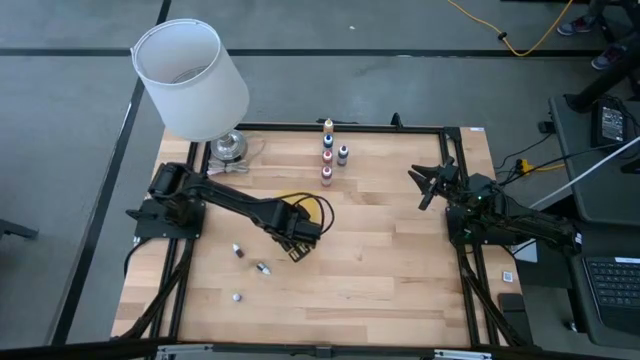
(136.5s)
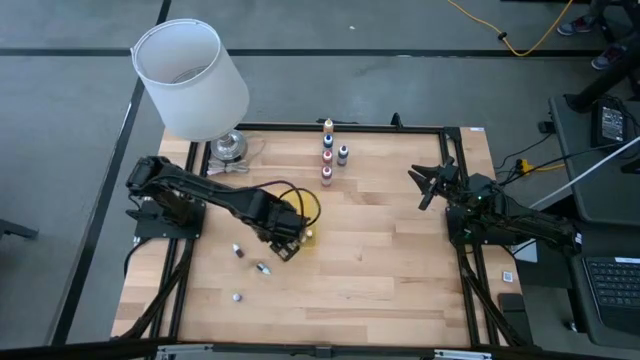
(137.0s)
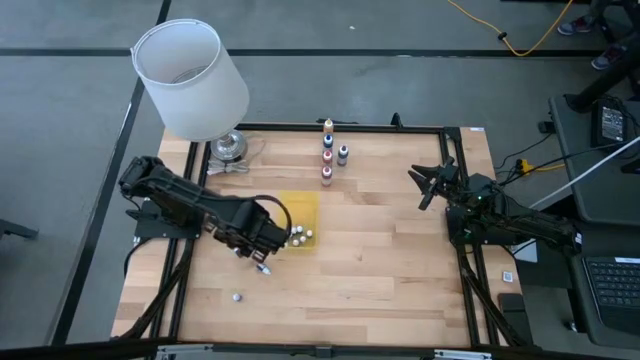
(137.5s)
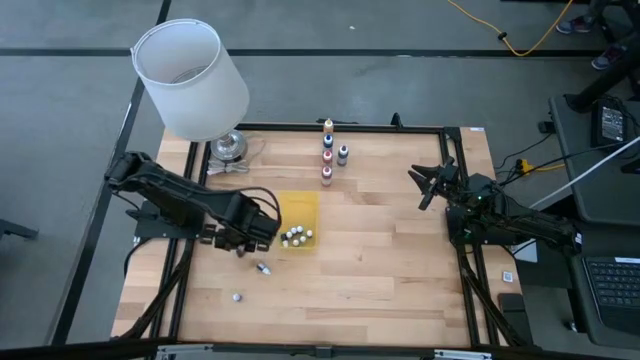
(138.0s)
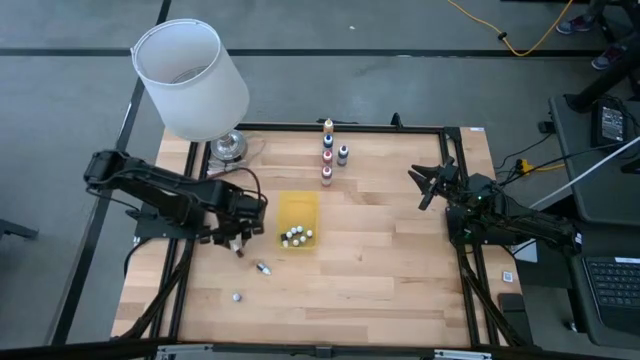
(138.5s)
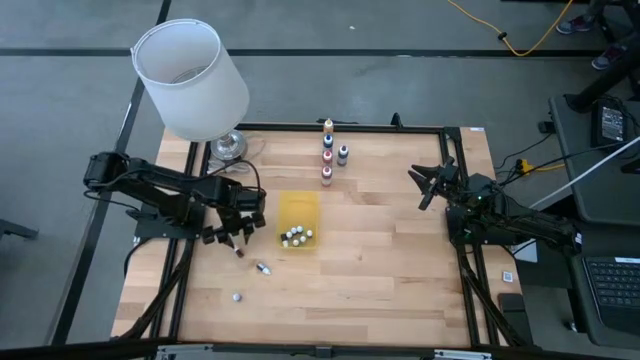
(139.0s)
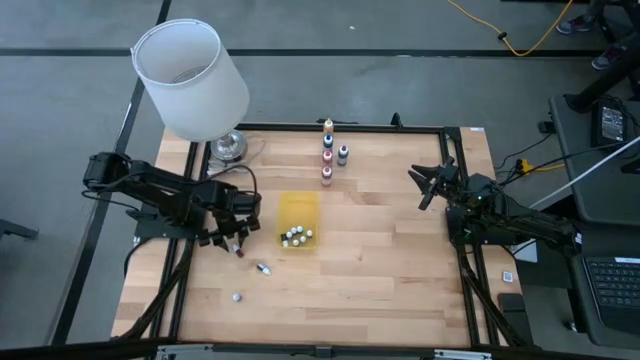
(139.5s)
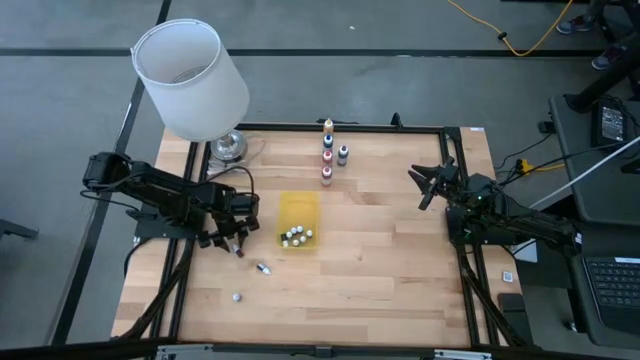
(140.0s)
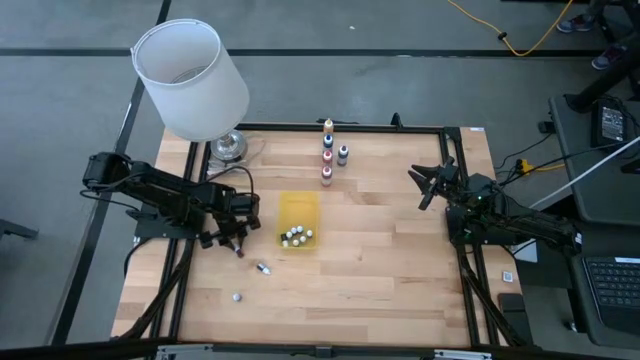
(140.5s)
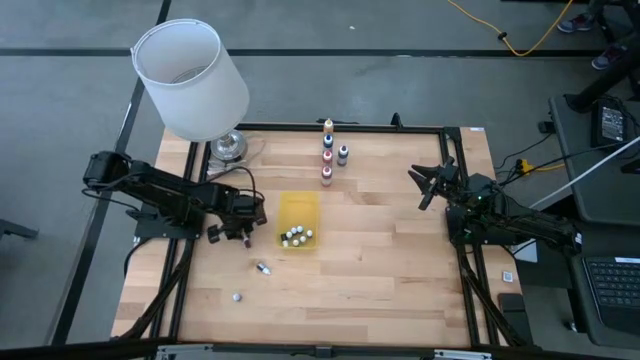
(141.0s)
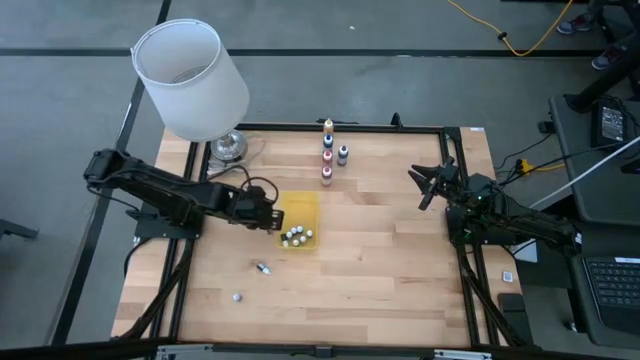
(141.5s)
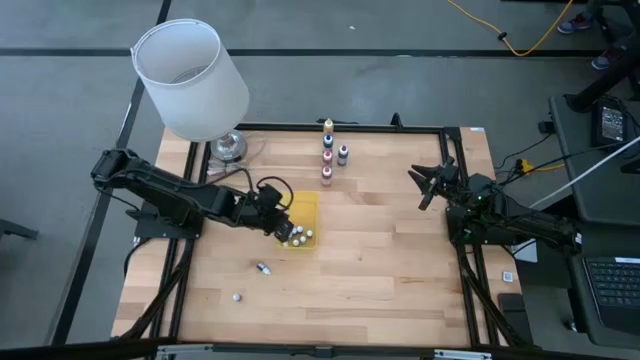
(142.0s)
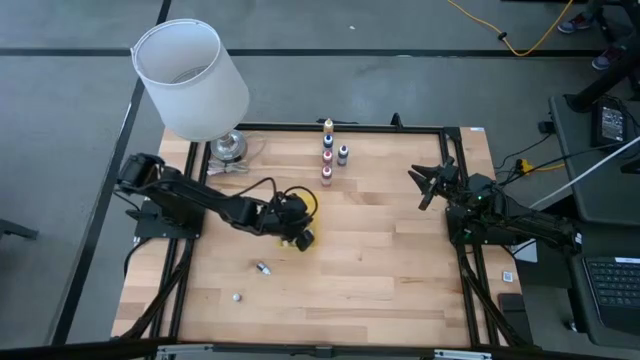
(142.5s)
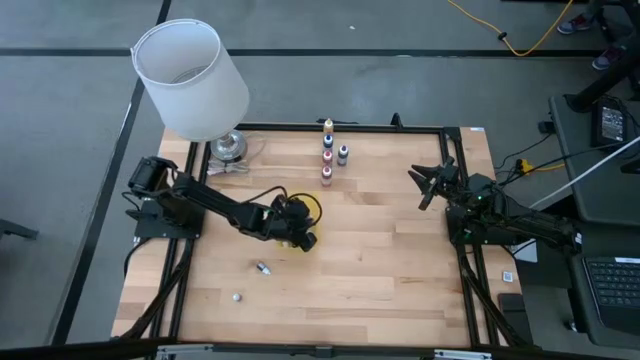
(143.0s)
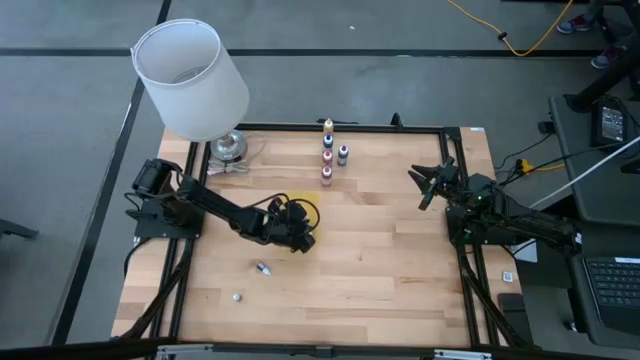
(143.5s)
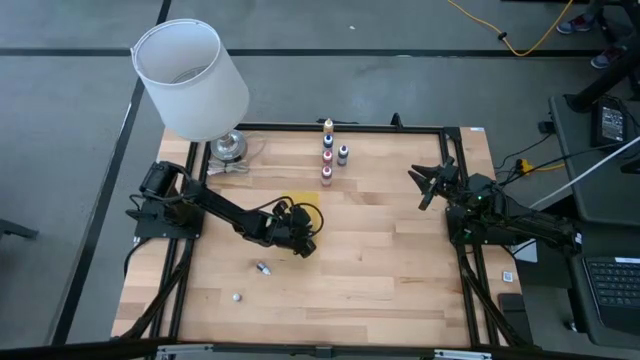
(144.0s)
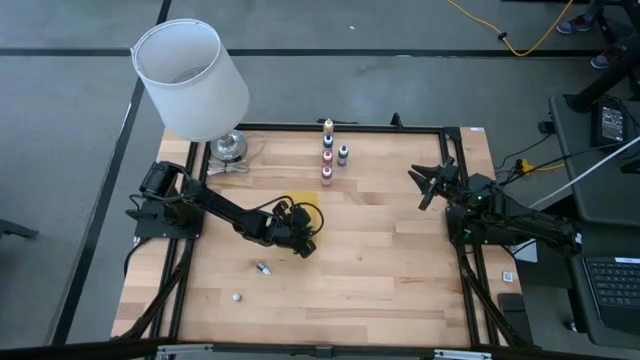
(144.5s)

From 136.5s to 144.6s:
Task: Pick & Place food coloring
Put the small red bottle into the yellow bin

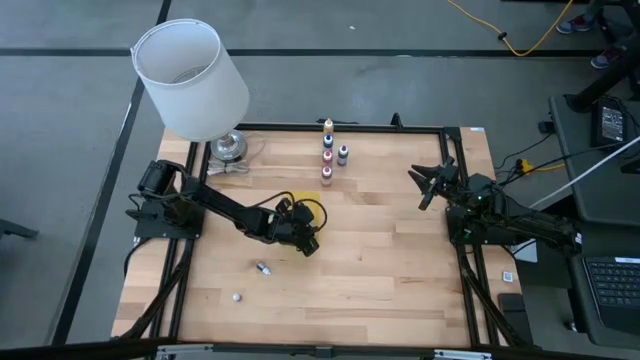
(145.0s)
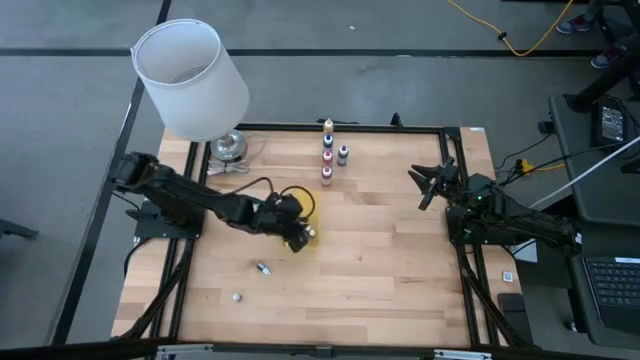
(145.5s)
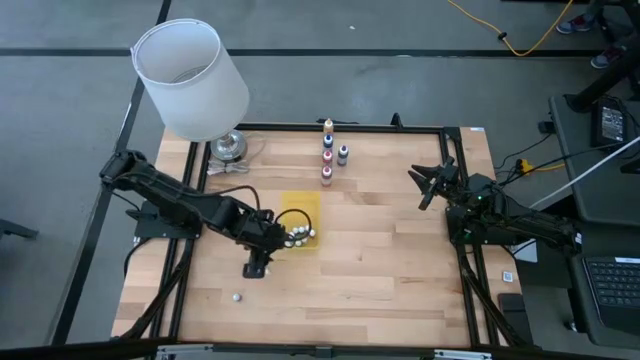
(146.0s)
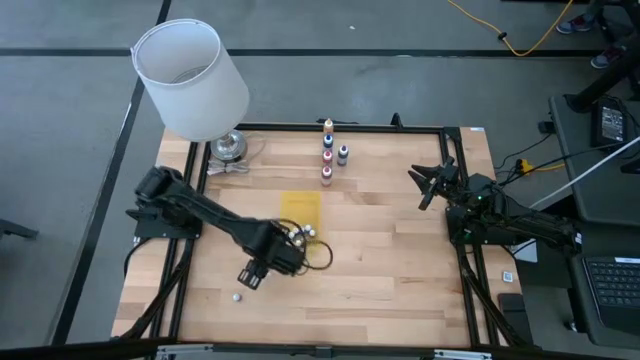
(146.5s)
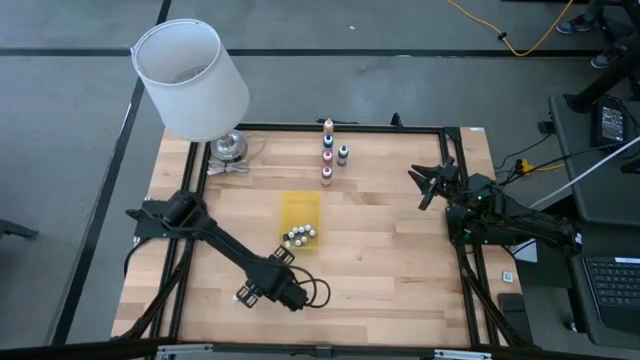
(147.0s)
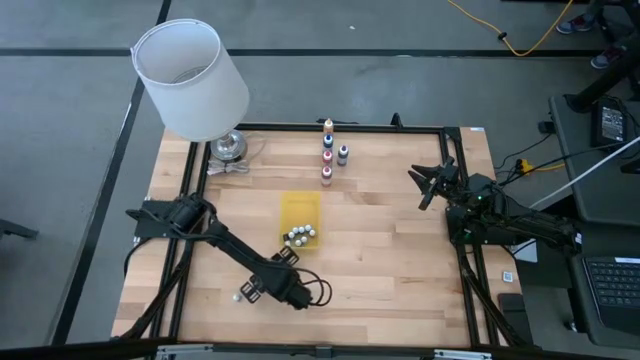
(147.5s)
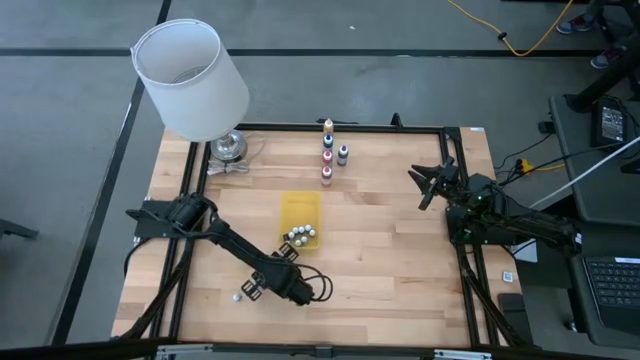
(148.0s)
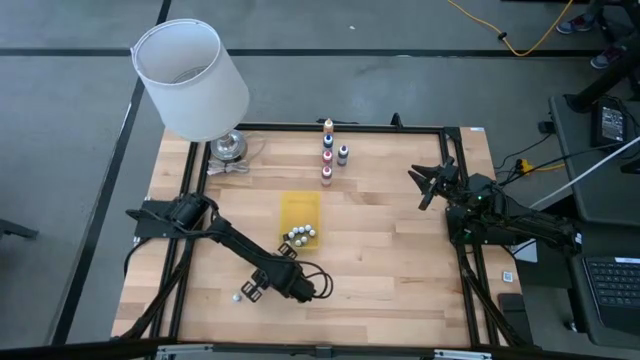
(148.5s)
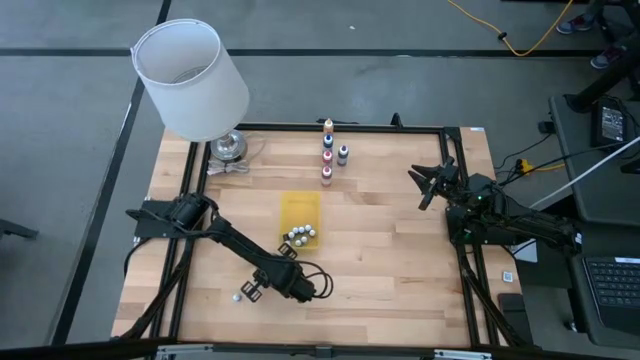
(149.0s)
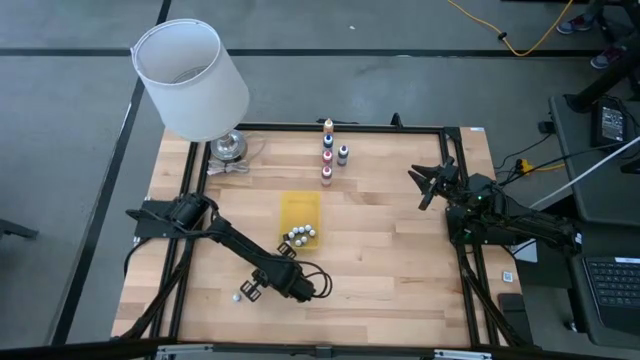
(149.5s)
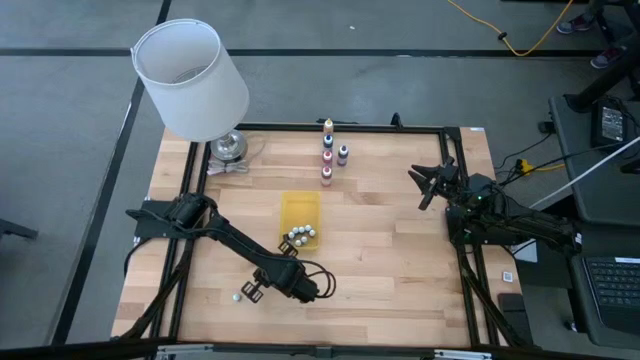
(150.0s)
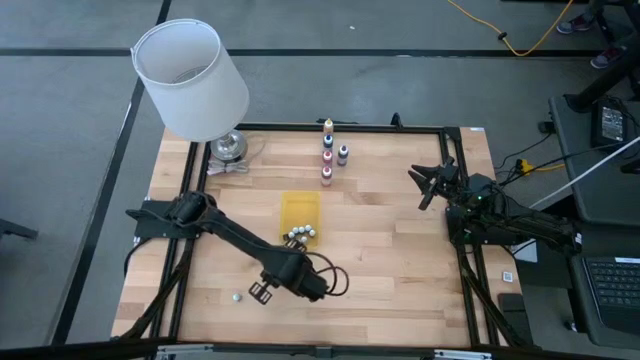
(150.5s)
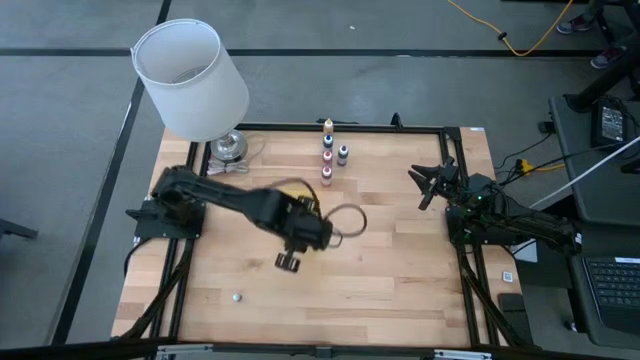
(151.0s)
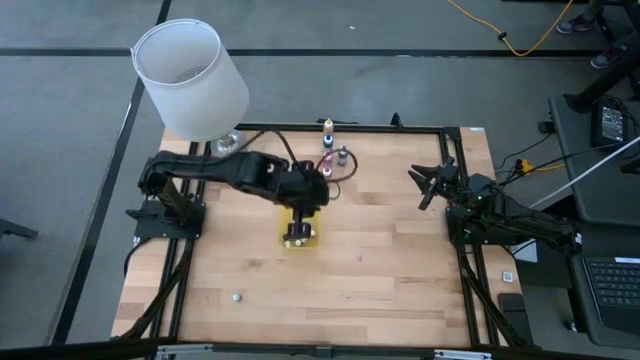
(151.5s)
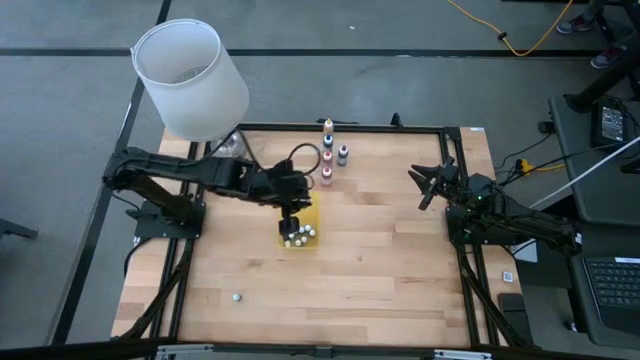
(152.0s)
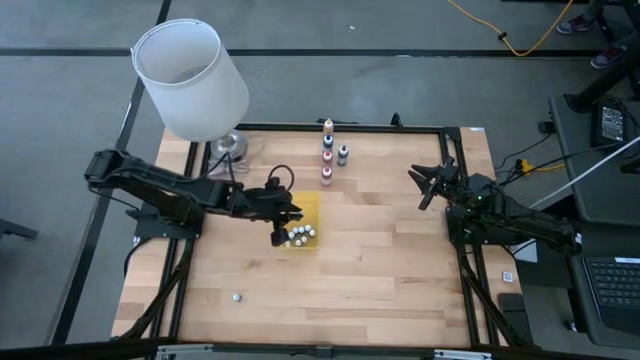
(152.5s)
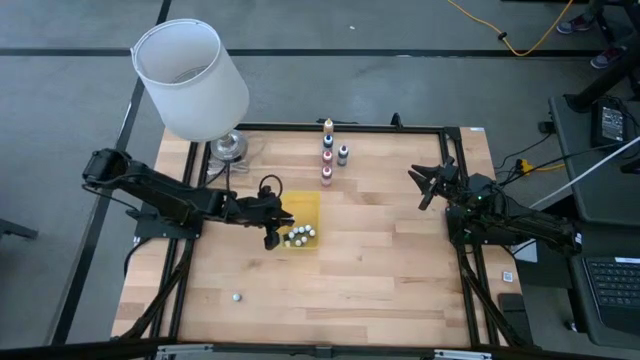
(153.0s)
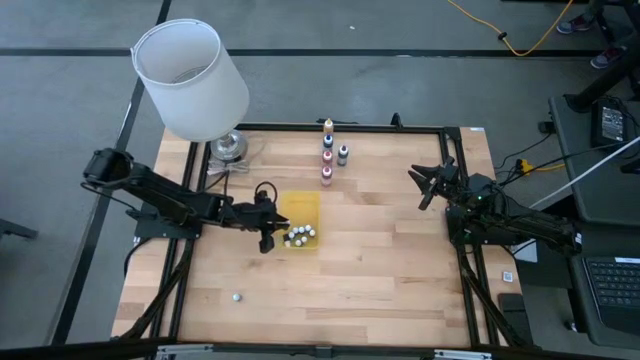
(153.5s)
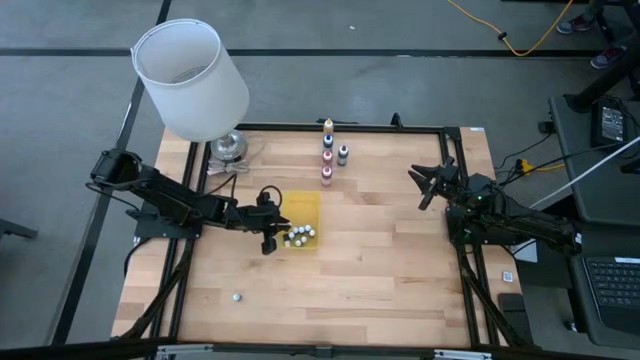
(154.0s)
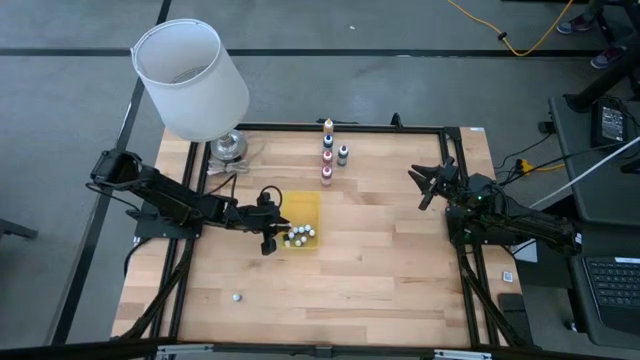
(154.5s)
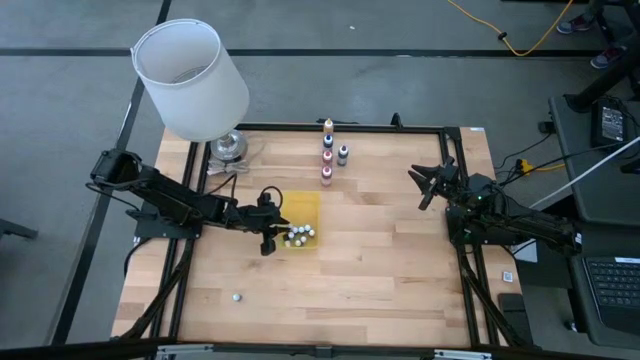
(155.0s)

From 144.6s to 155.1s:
Put the small purple bottle into the yellow bin
